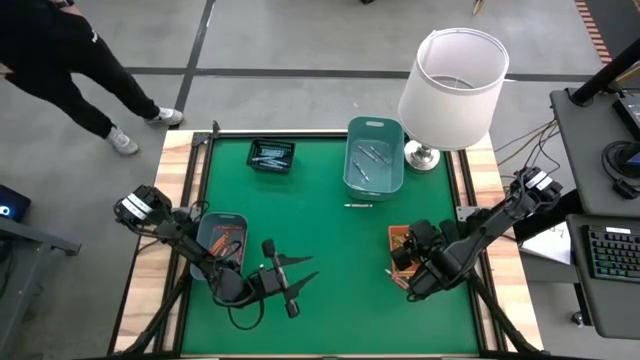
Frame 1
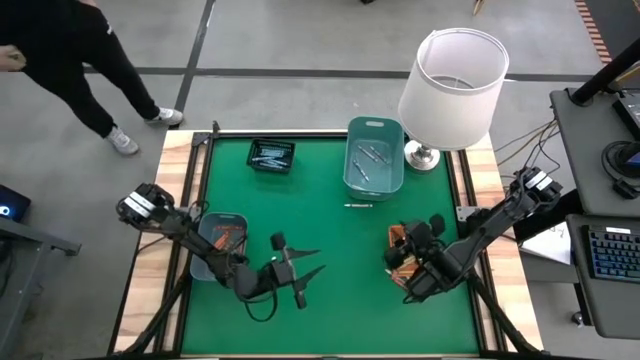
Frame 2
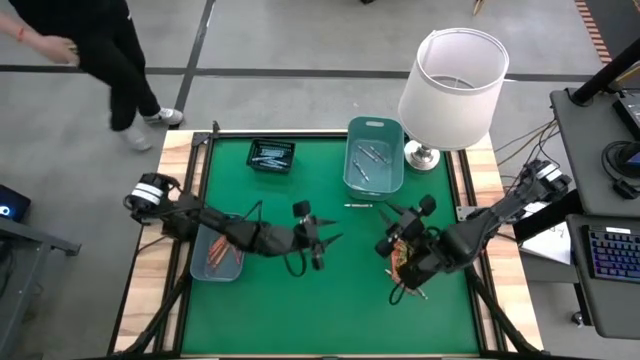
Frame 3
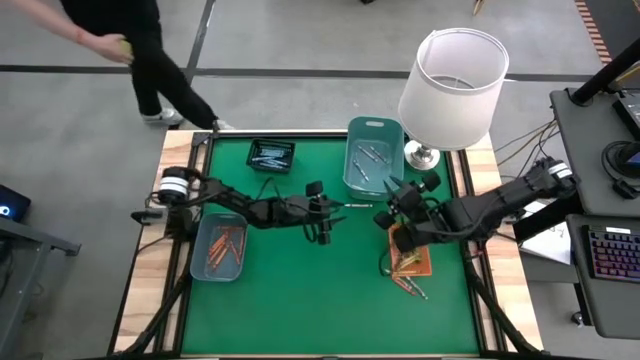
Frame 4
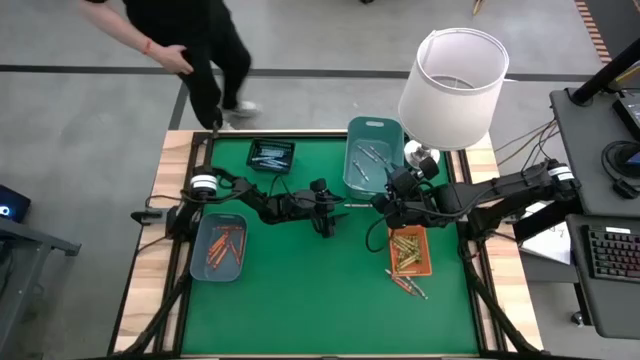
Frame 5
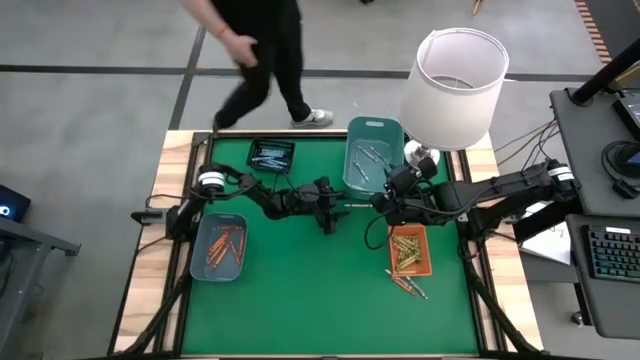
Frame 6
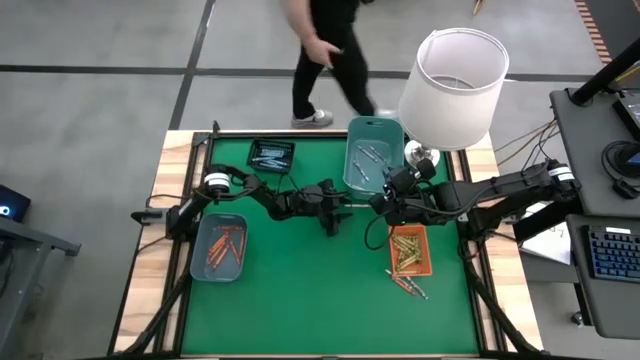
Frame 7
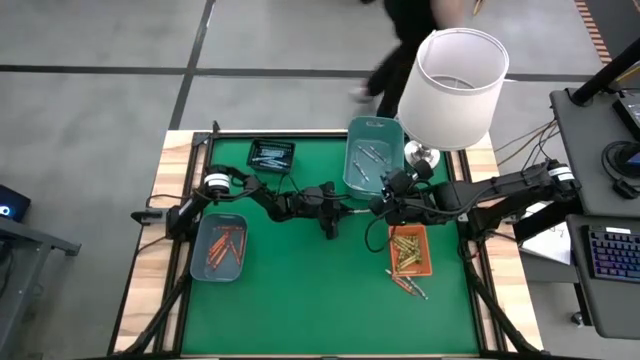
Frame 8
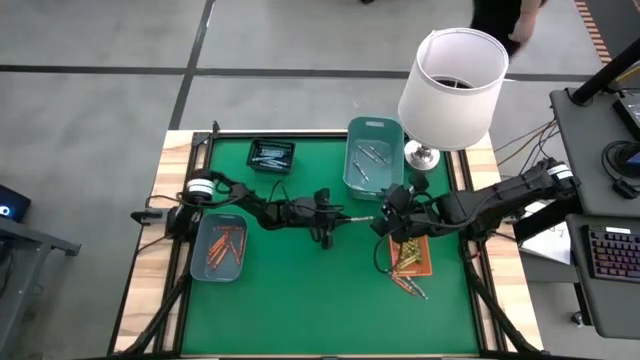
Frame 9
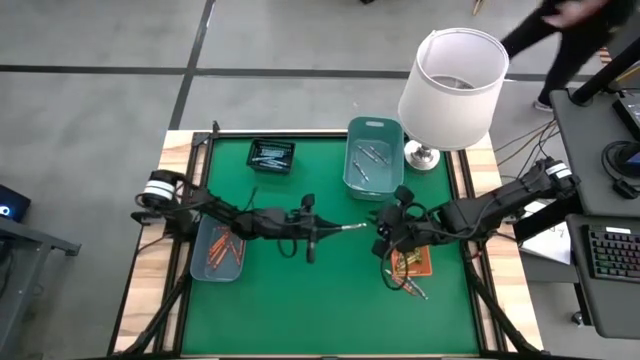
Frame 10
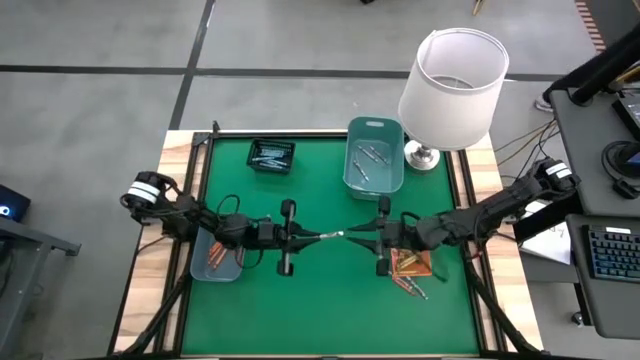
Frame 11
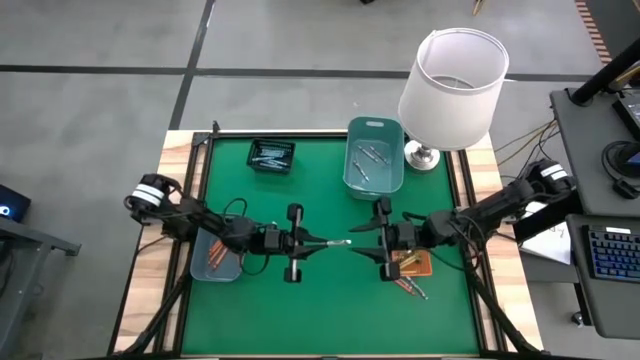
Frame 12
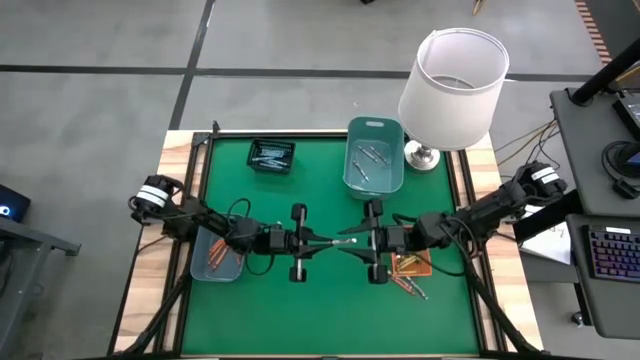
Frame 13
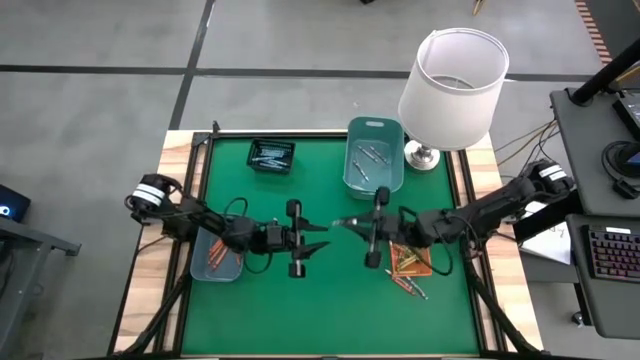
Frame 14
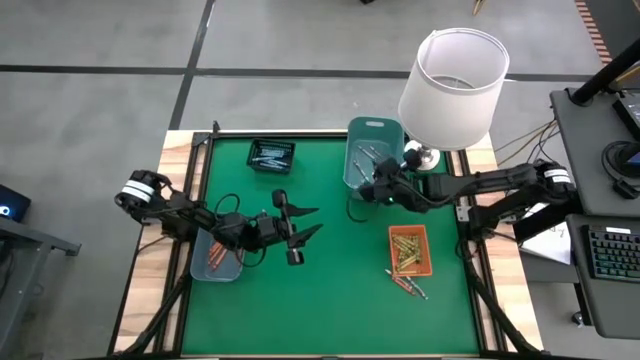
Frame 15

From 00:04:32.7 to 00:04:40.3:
Task: Sort crayons
Put the white crayon into the green bin

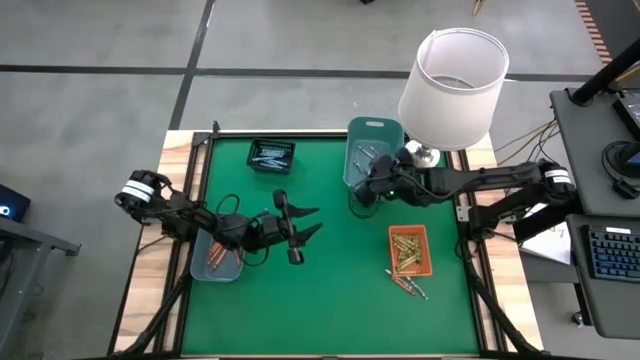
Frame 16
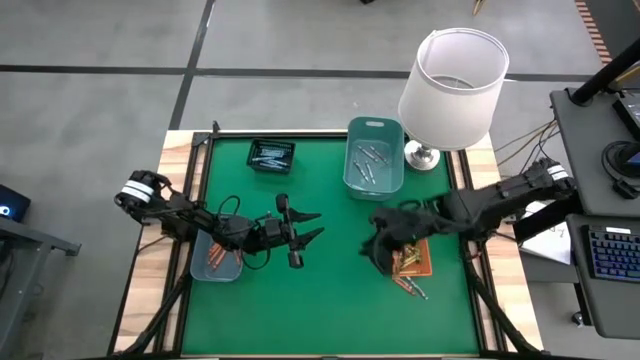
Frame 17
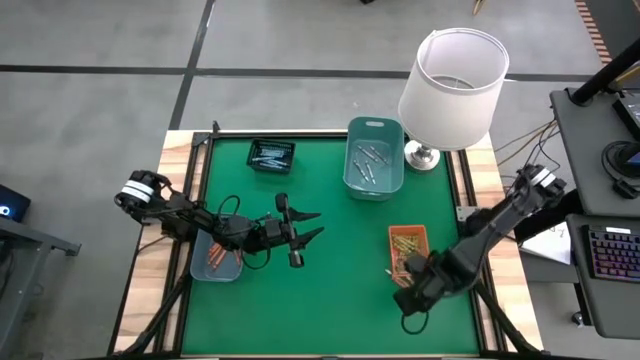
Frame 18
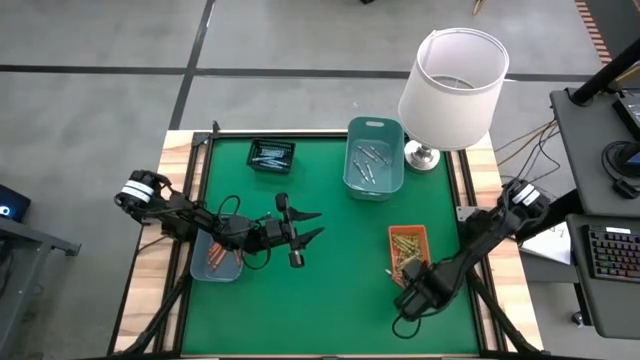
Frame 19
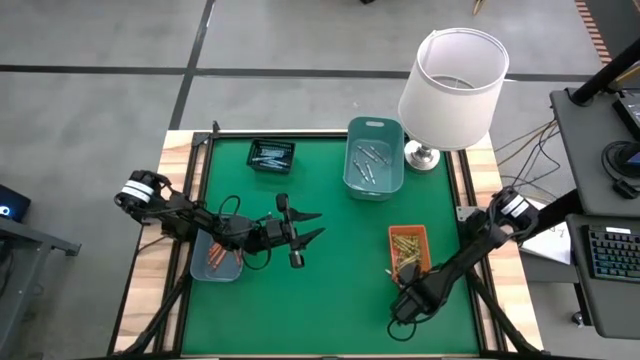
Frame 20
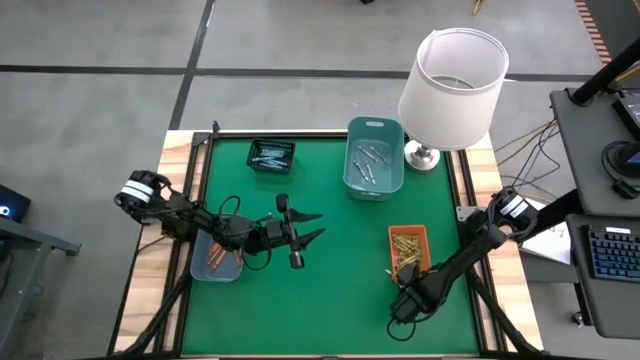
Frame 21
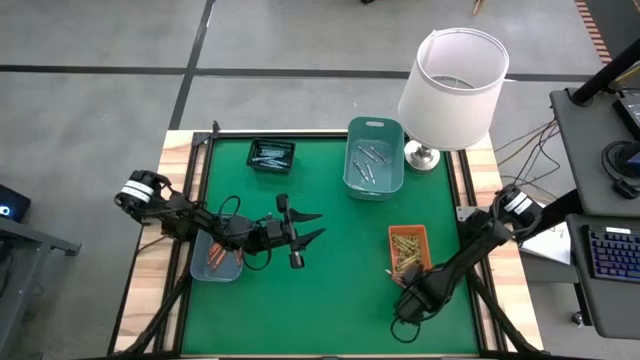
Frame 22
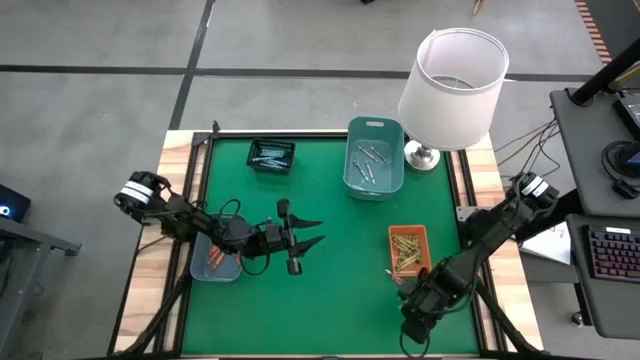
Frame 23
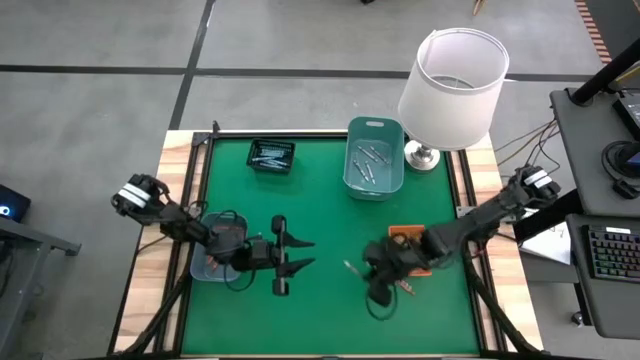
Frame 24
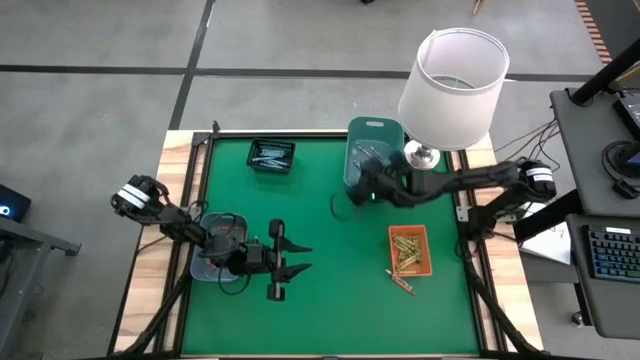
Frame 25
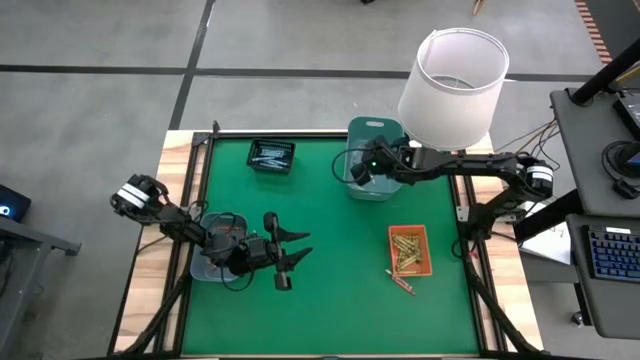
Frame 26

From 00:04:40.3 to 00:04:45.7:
Put the white crayon into the green bin

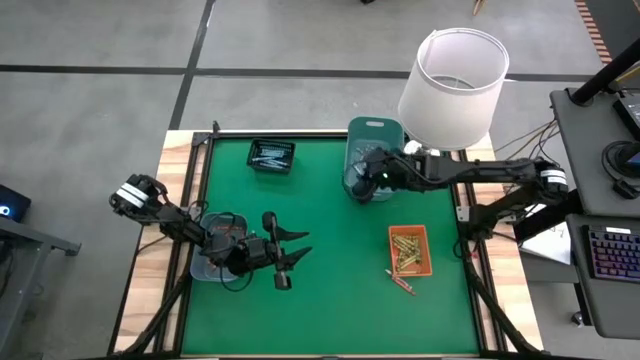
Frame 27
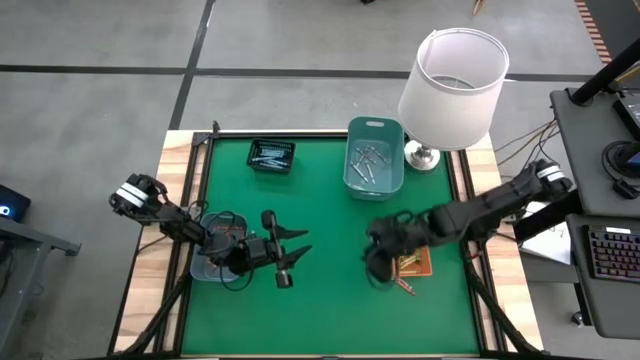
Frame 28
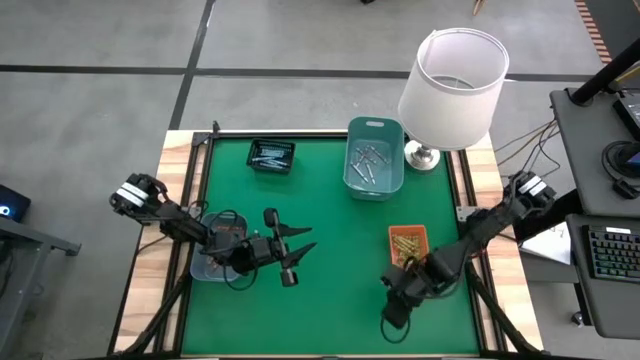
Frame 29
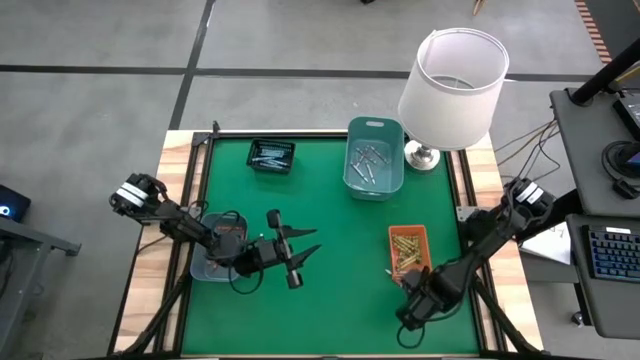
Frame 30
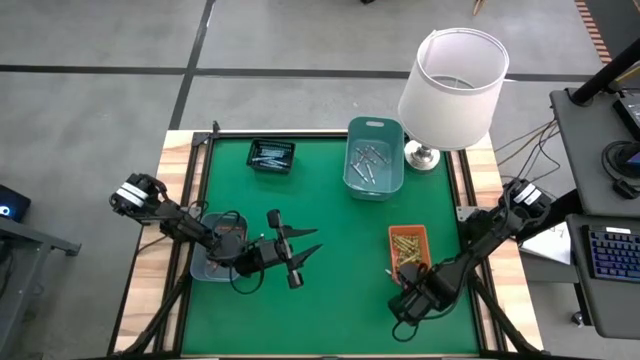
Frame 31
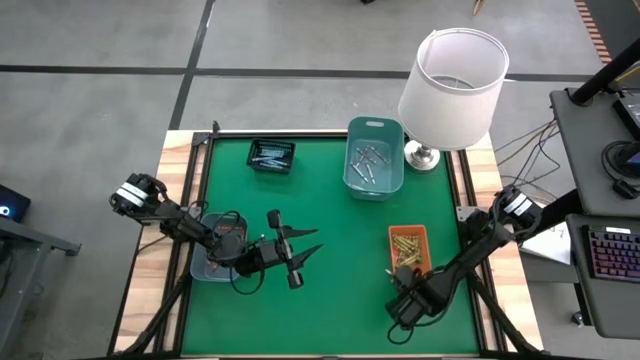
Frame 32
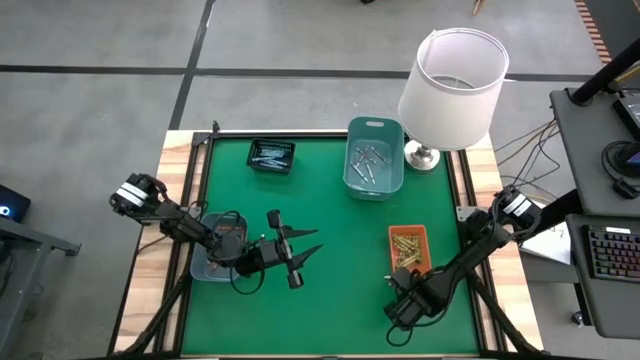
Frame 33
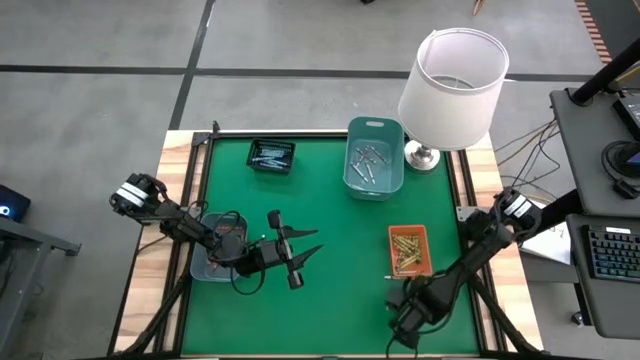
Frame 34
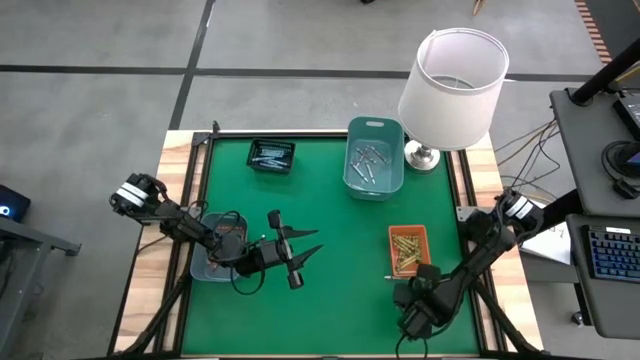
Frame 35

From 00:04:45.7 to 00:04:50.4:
Put the orange crayon into the blue bin

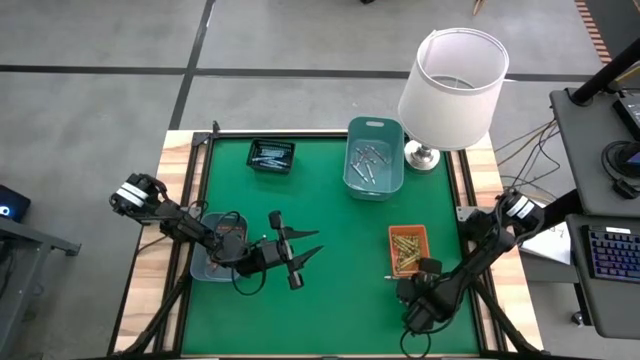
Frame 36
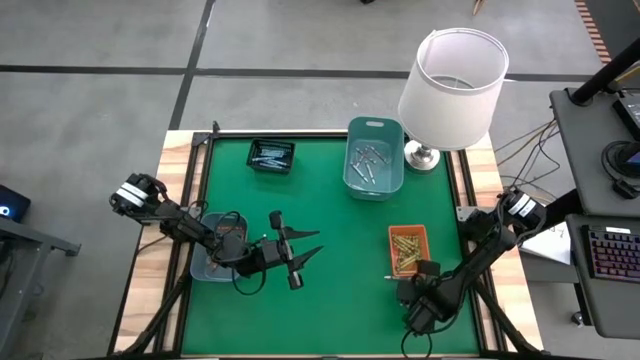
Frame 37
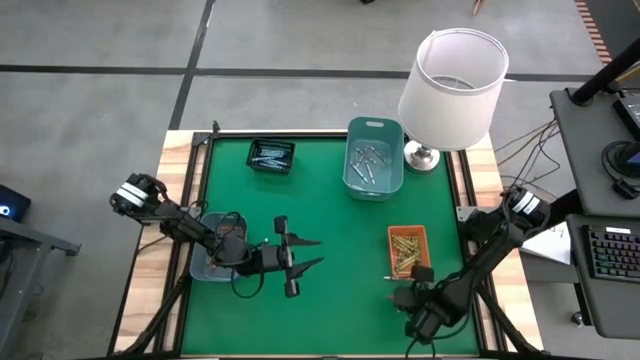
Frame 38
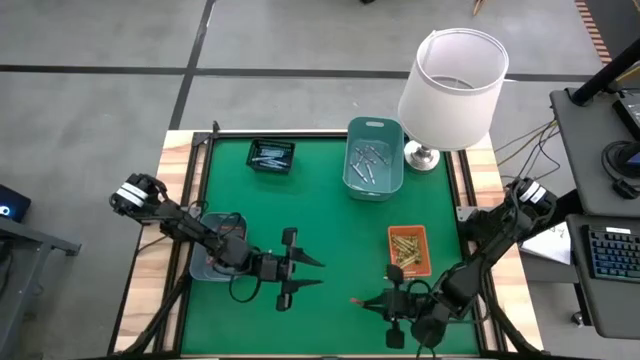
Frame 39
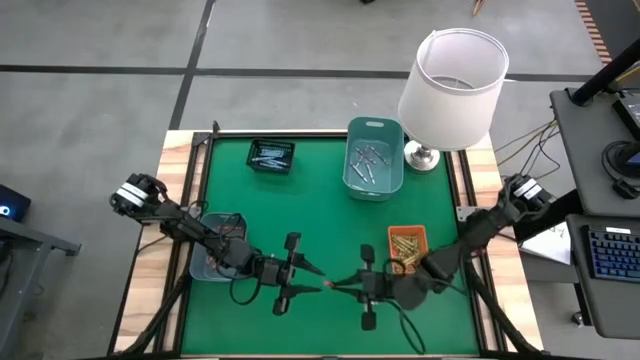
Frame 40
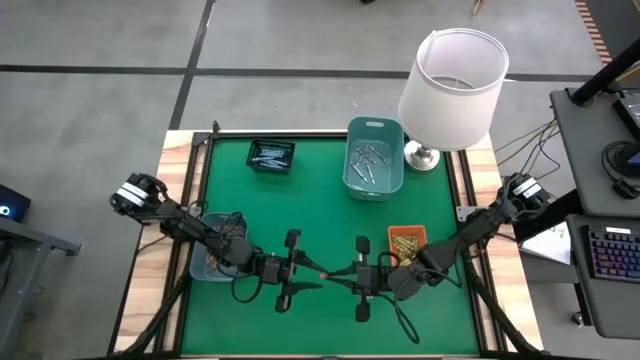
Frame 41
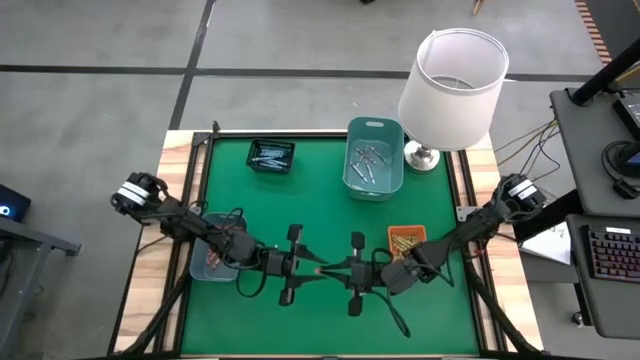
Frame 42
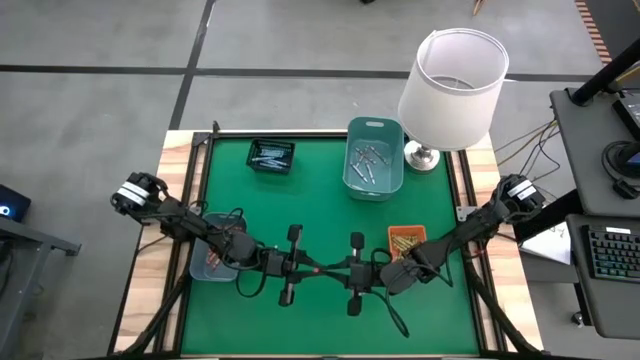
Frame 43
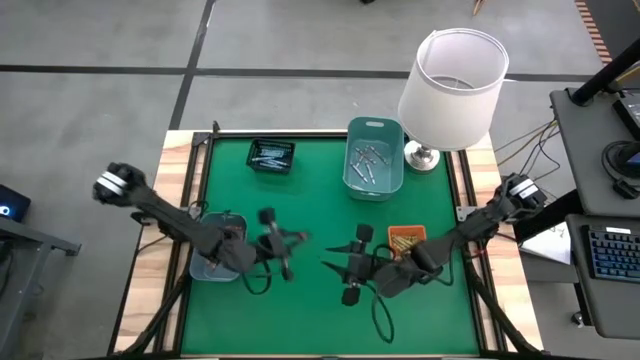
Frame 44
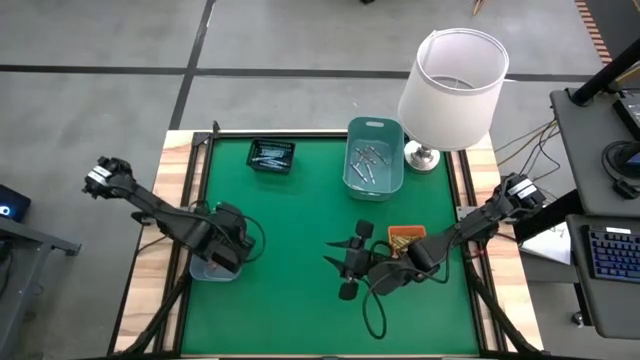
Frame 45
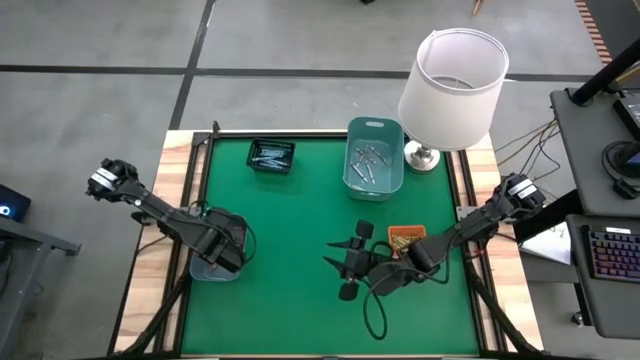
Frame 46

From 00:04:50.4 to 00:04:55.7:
Put the orange crayon into the blue bin
